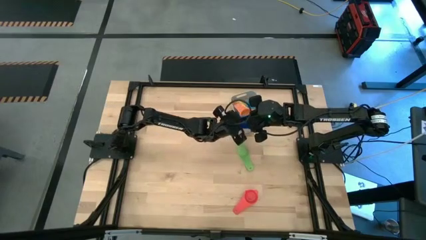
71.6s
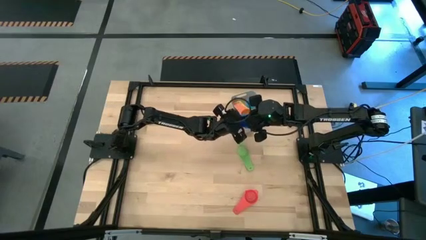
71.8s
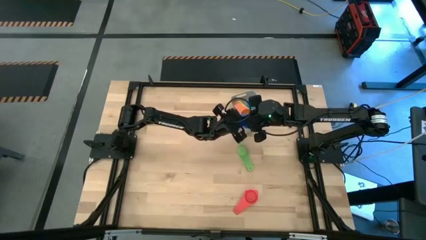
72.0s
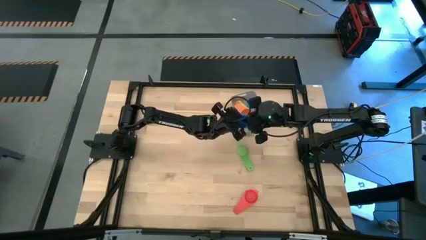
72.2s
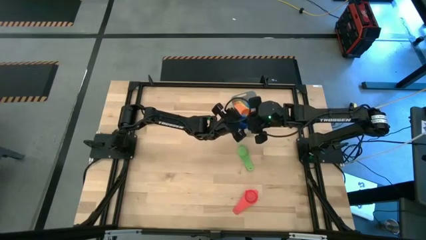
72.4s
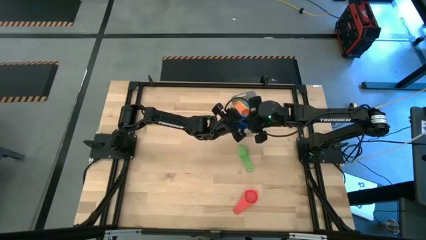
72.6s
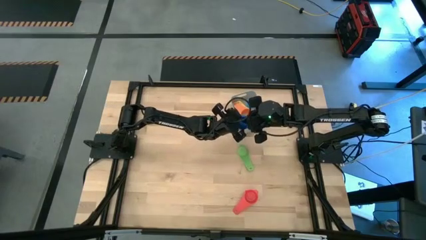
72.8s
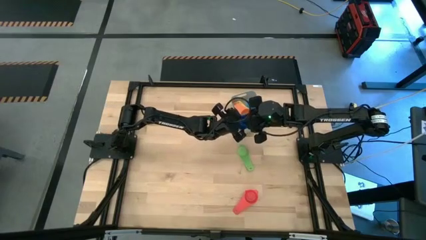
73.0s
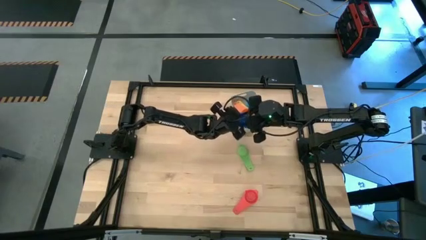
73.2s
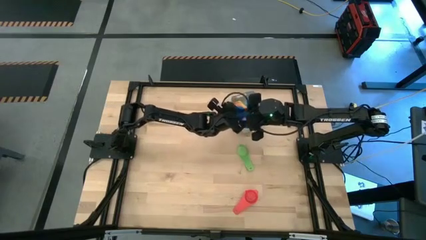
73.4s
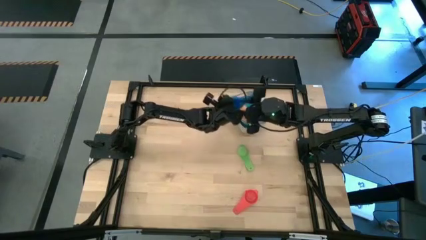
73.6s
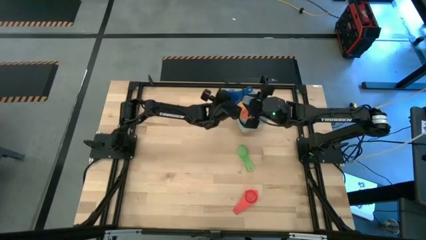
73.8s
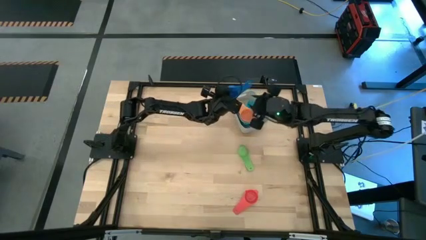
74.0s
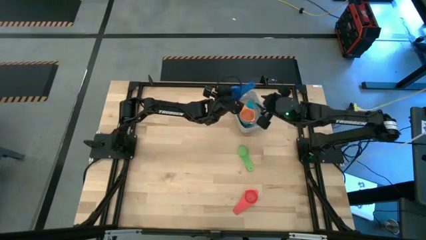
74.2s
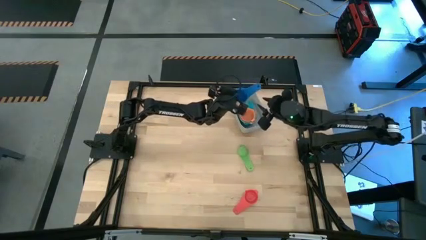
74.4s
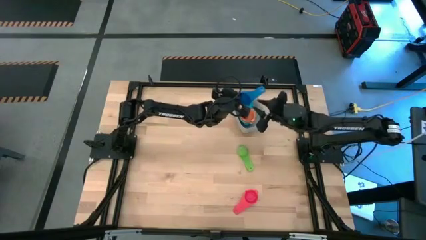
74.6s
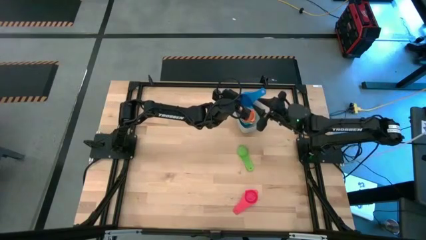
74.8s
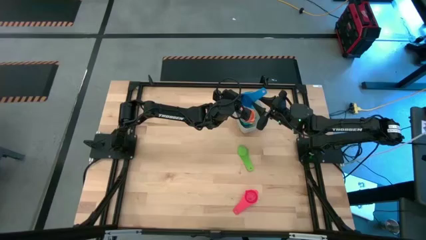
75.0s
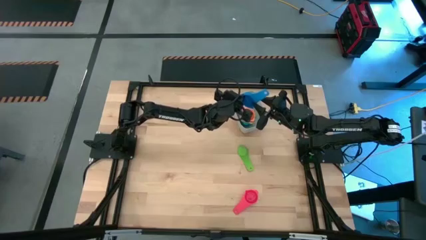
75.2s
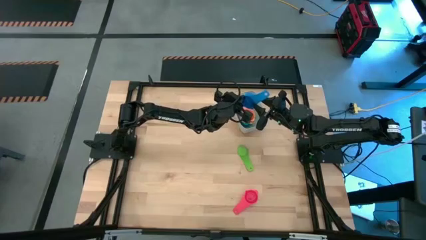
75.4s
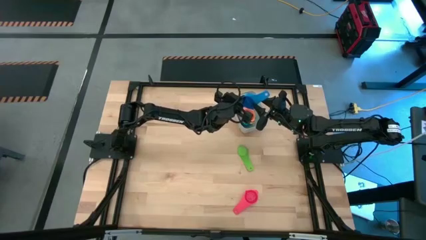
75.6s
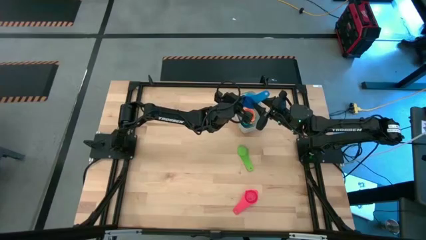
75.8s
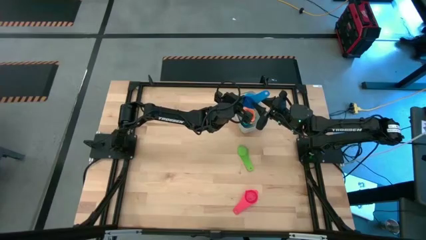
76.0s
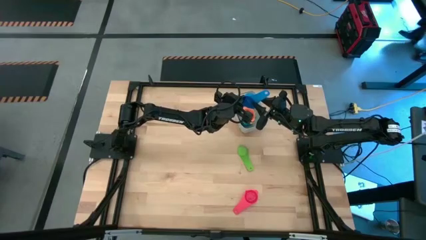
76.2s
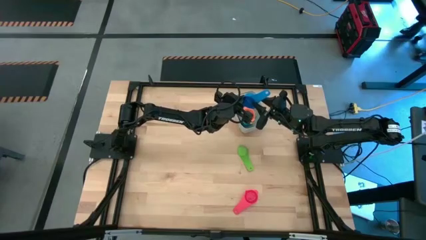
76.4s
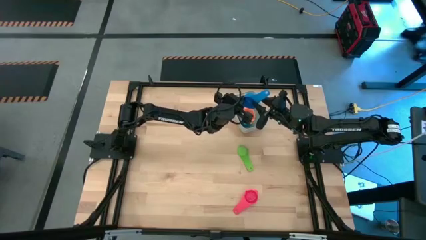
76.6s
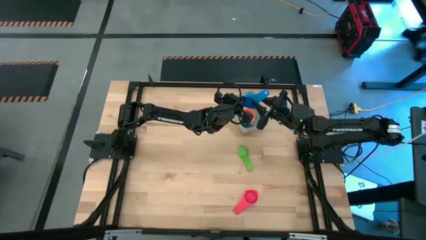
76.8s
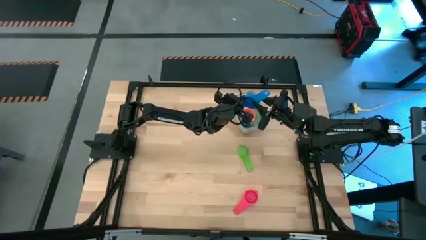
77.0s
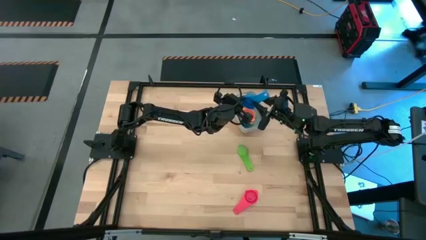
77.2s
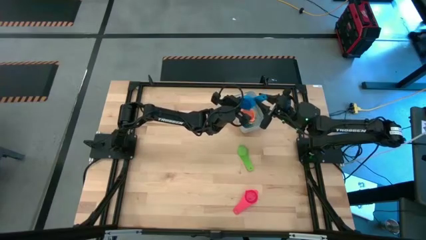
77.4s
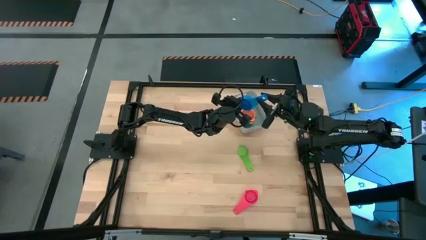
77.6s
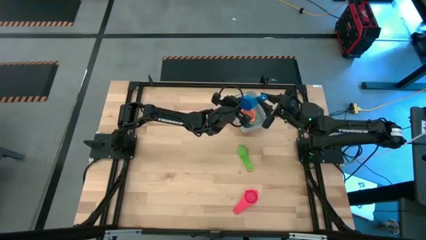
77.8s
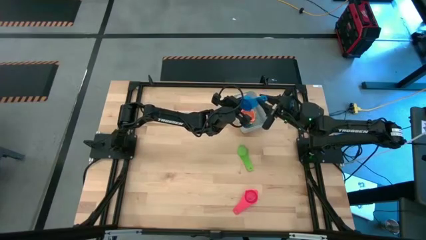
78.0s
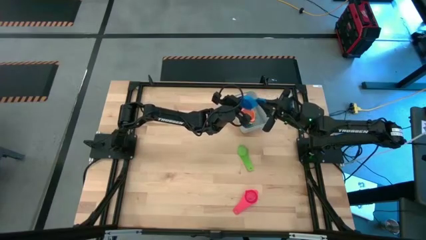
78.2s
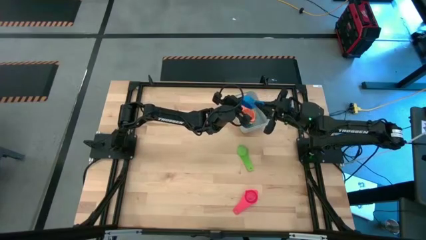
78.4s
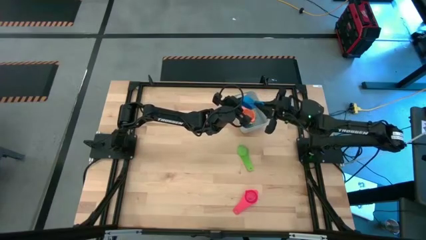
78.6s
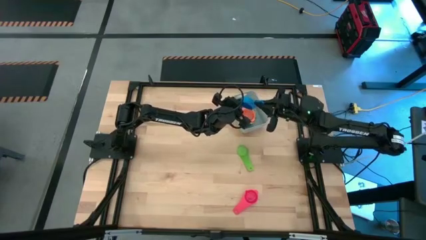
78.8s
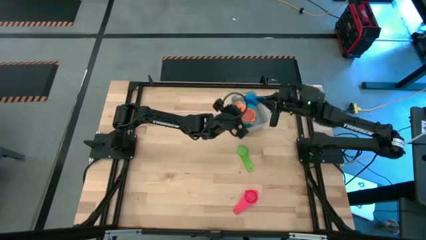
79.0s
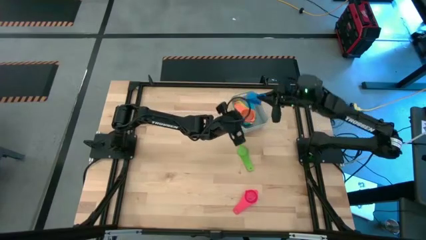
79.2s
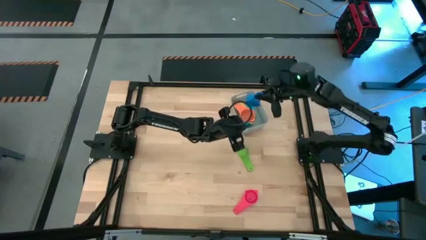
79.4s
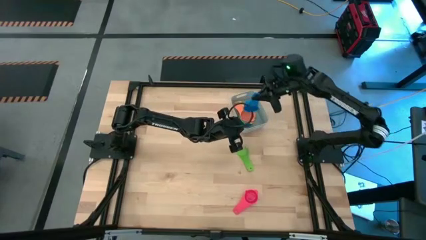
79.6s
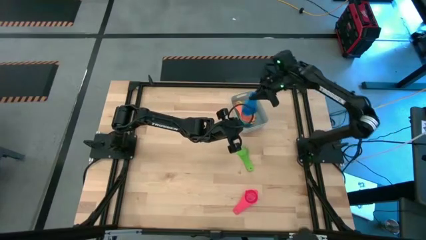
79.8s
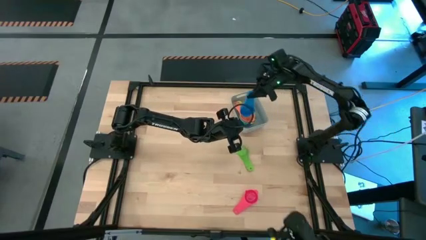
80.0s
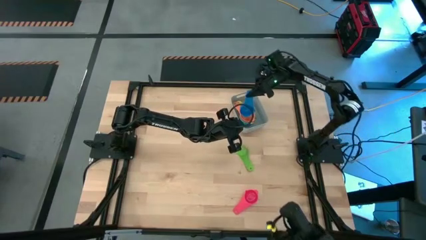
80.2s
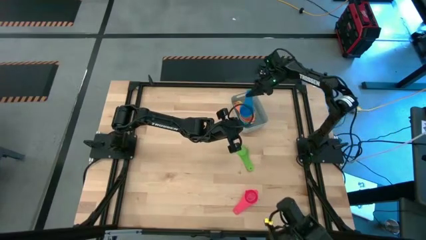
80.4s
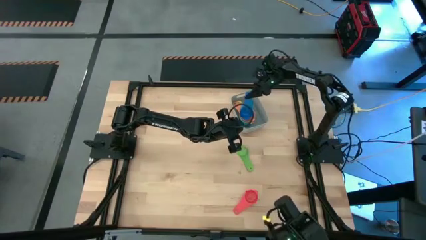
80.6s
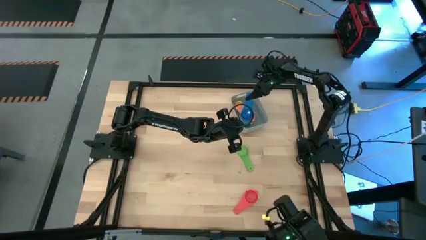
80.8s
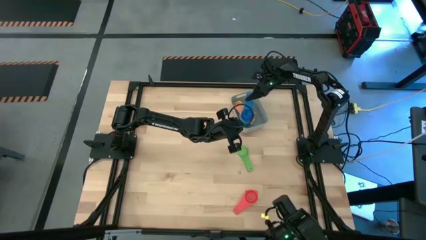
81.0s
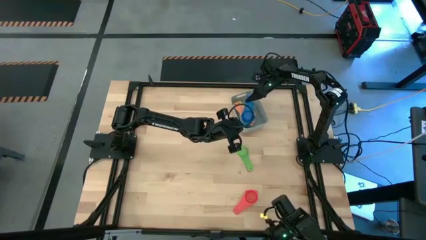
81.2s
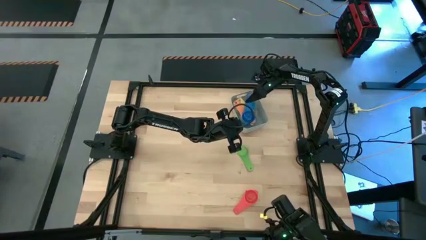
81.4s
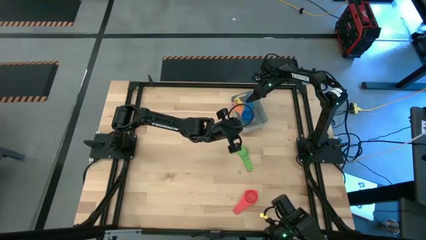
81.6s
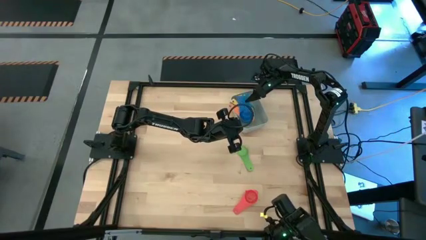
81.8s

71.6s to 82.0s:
Task: Nest measuring cups in basket
Stack the blue measuring cup on top of the orange measuring cup into the gray gray bin
